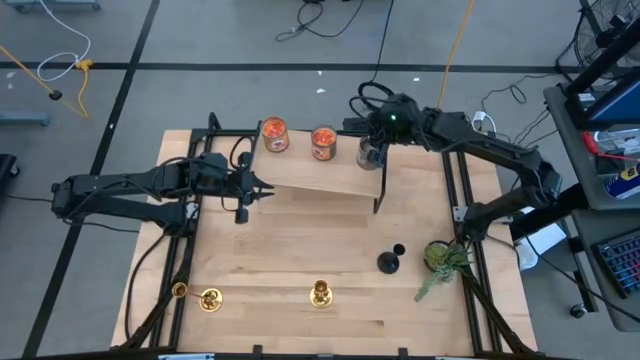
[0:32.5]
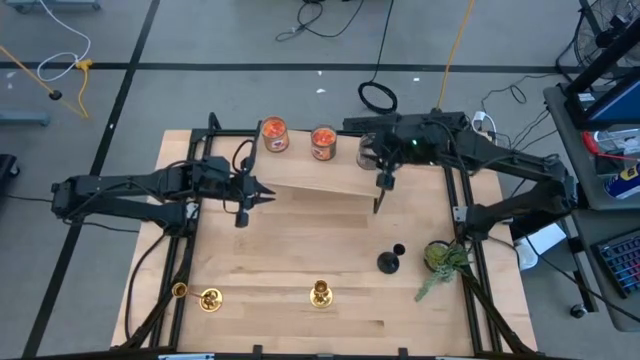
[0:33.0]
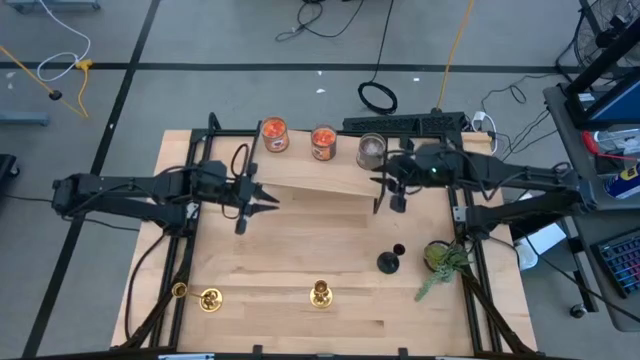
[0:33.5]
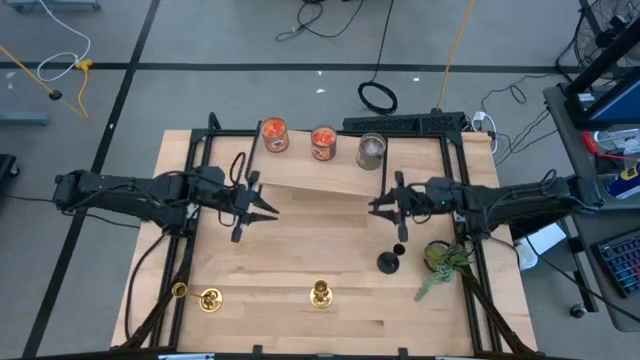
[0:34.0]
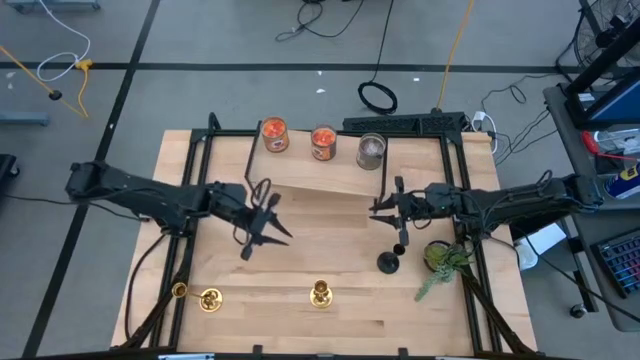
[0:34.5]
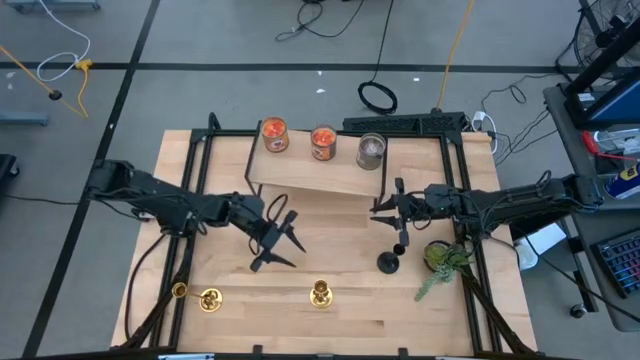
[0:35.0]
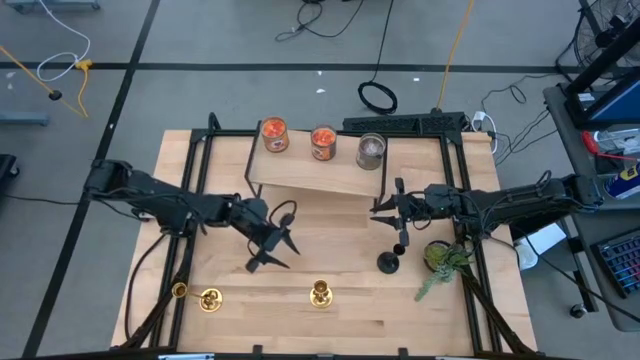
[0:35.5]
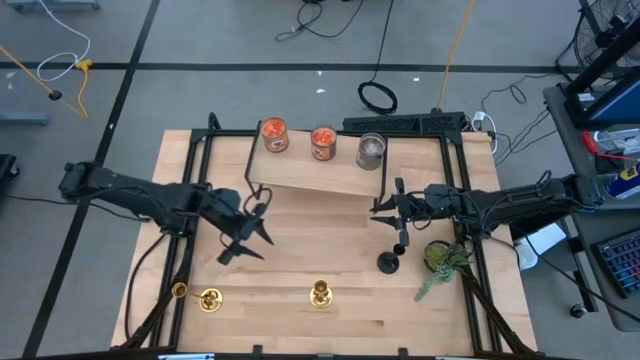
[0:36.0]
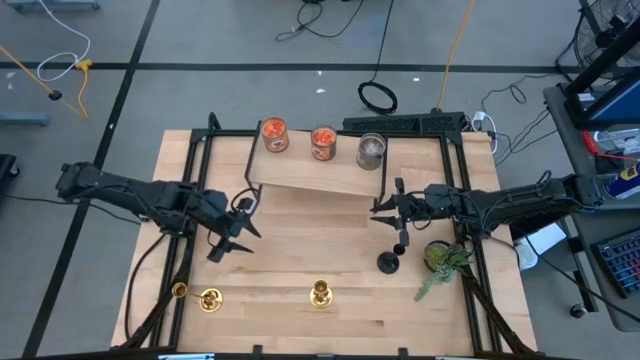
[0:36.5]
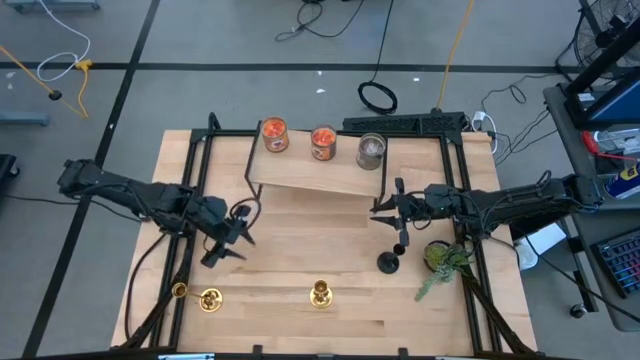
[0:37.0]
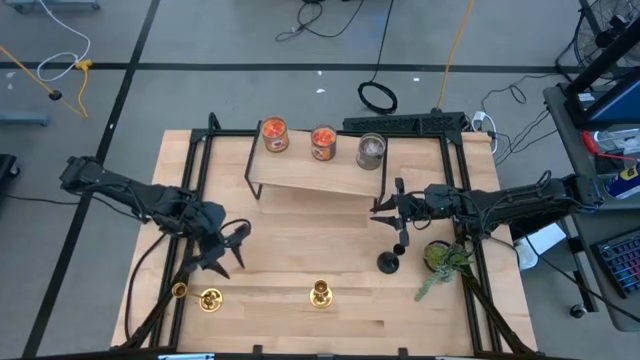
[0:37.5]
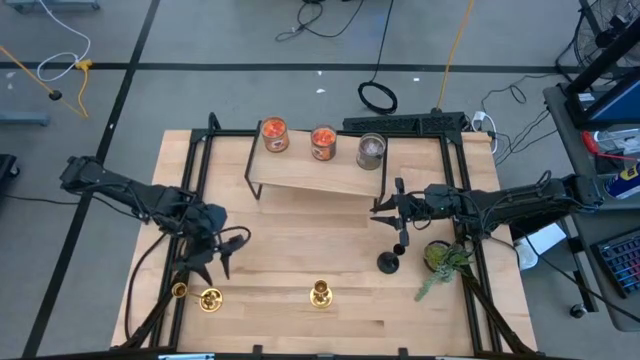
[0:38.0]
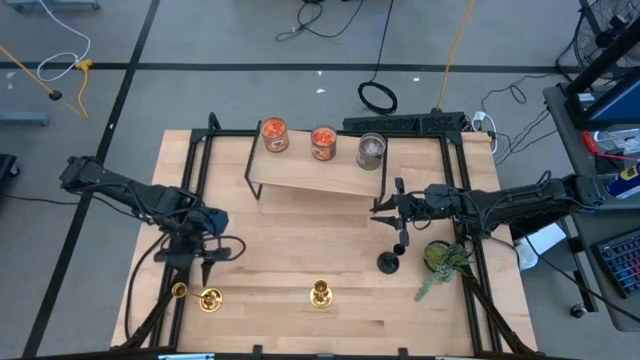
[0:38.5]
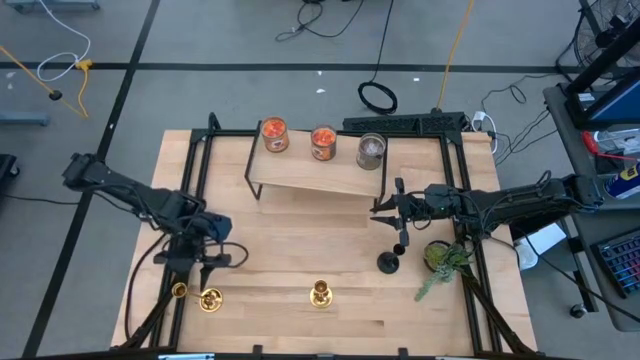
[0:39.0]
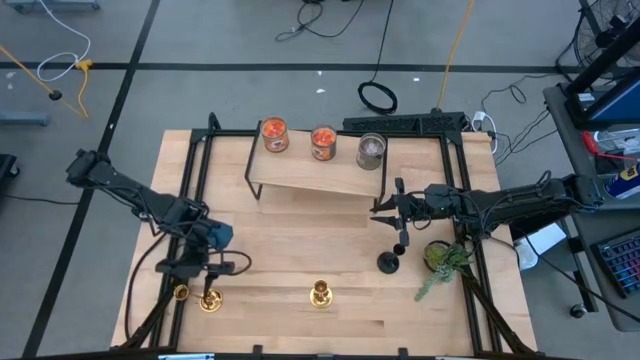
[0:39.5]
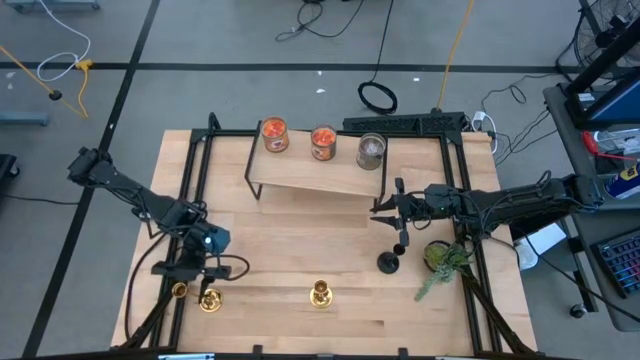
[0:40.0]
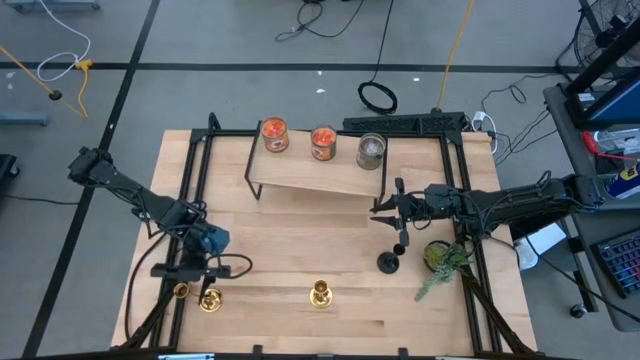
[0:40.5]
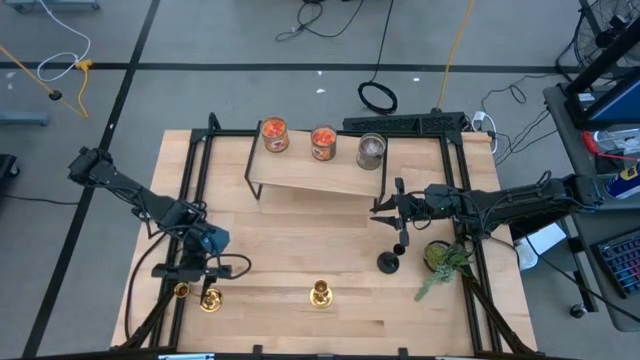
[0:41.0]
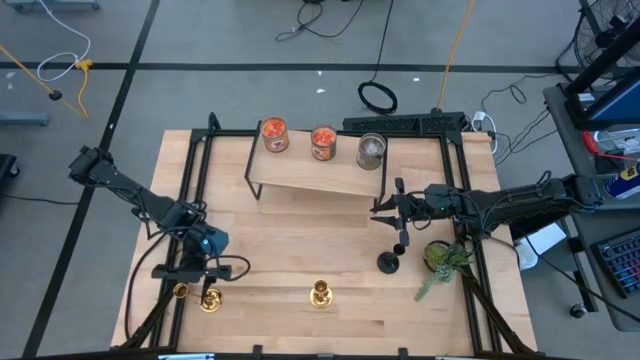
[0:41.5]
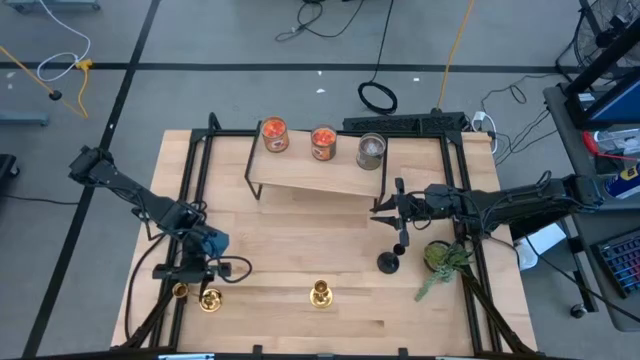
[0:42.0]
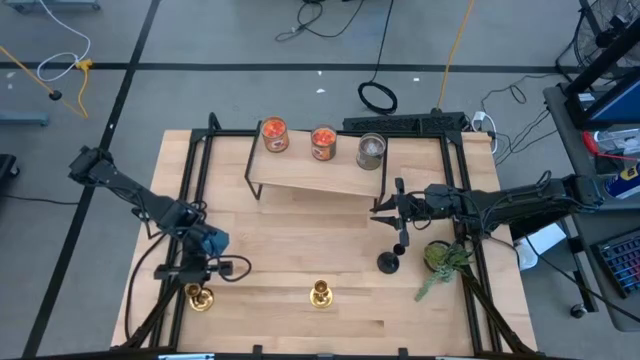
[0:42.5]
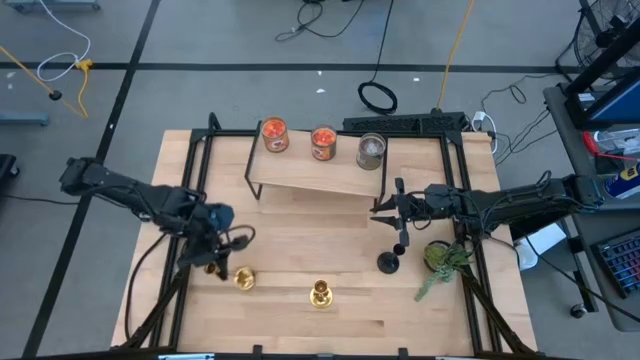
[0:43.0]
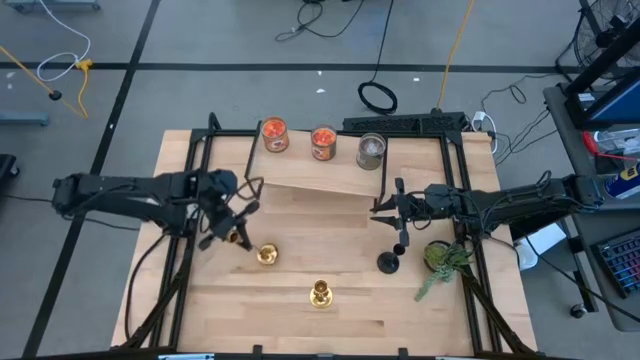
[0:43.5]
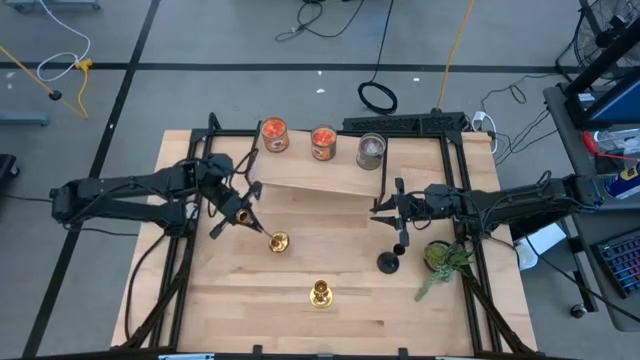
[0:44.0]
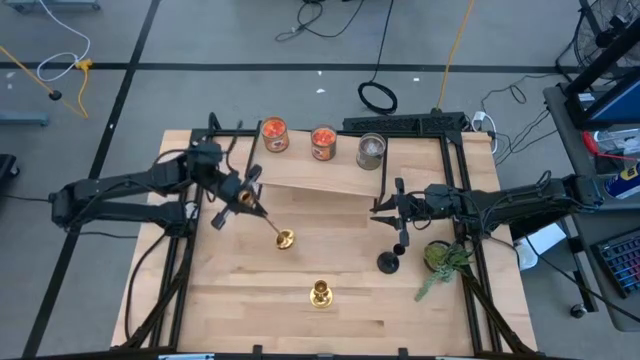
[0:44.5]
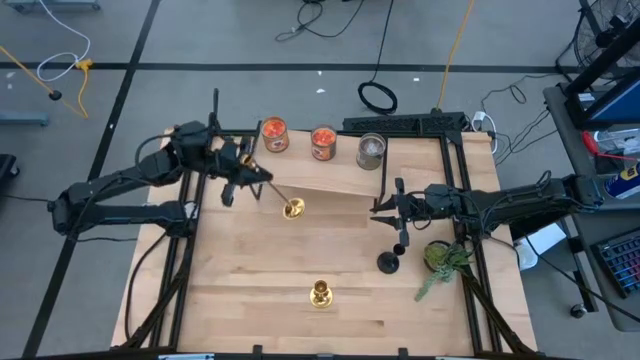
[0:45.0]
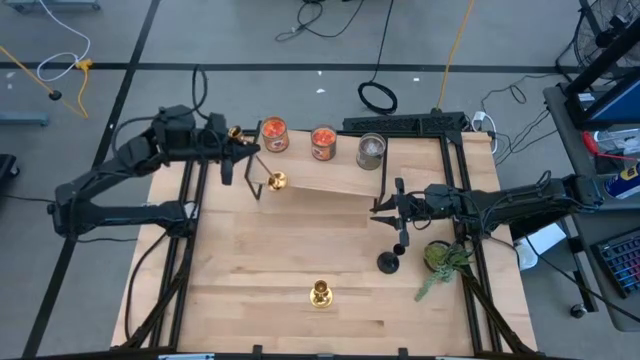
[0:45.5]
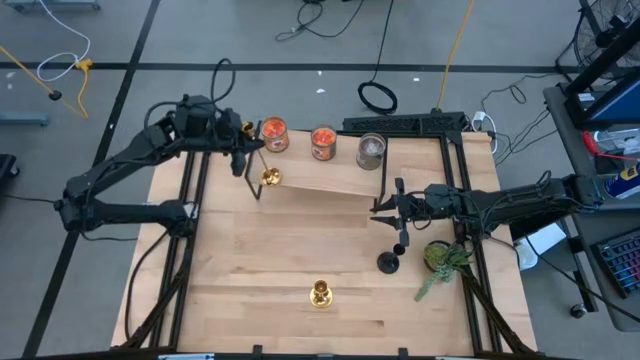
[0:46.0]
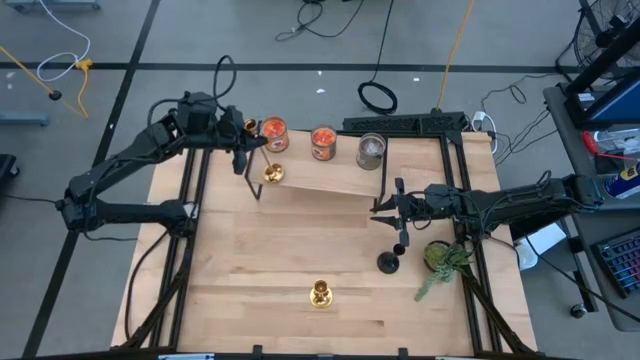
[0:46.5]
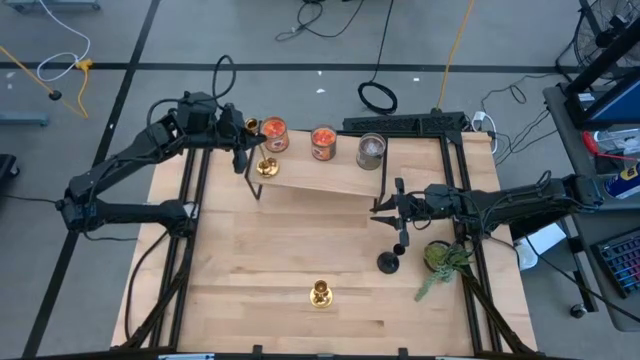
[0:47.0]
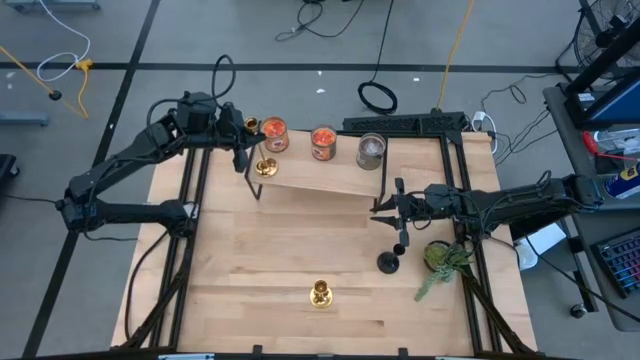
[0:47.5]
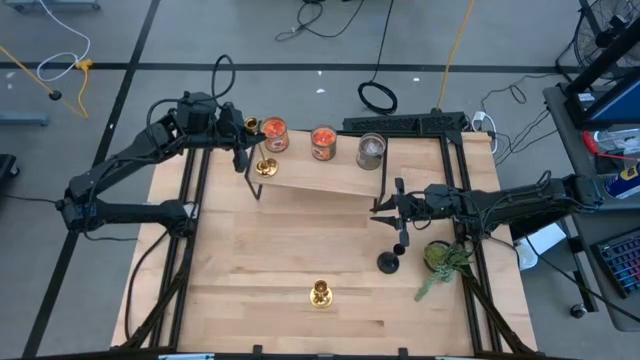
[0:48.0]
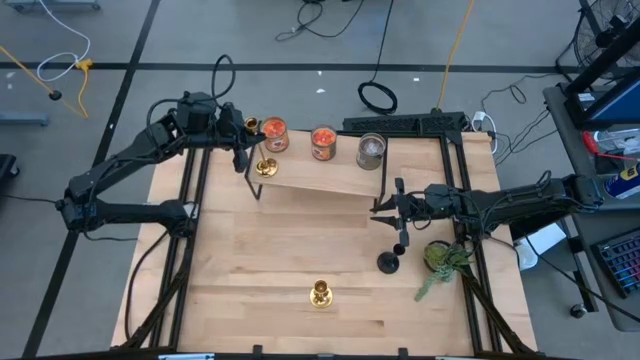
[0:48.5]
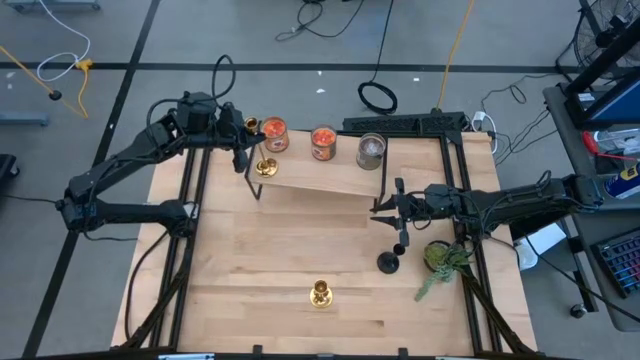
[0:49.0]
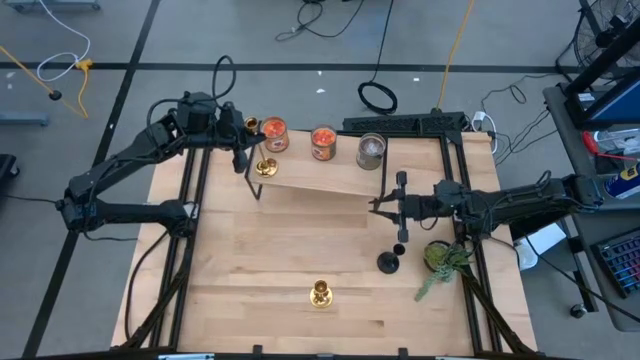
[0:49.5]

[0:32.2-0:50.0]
Task: Pick & Place candle stick holders
Put the left gold candle holder on the shelf

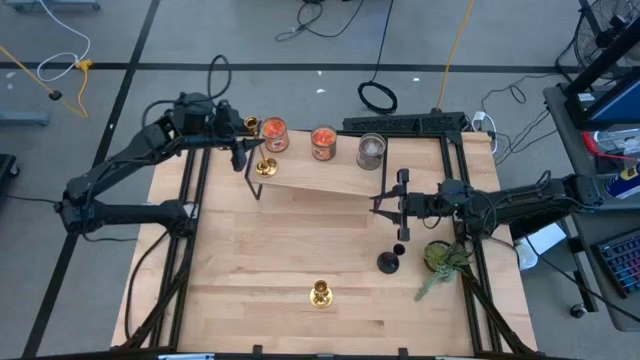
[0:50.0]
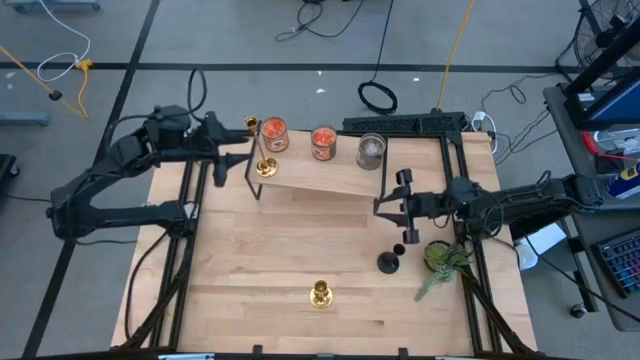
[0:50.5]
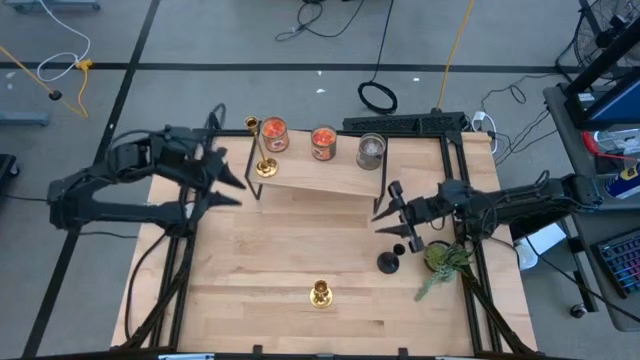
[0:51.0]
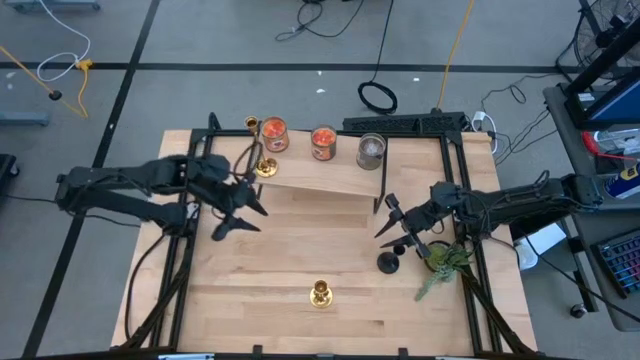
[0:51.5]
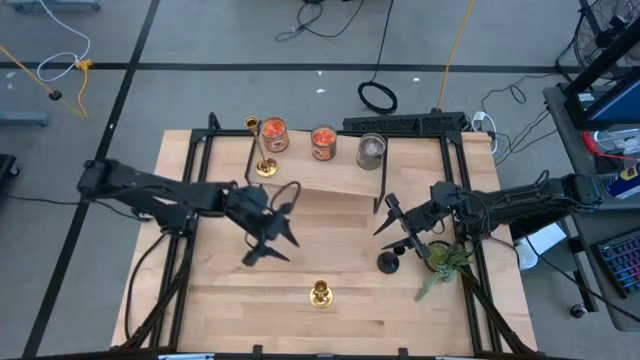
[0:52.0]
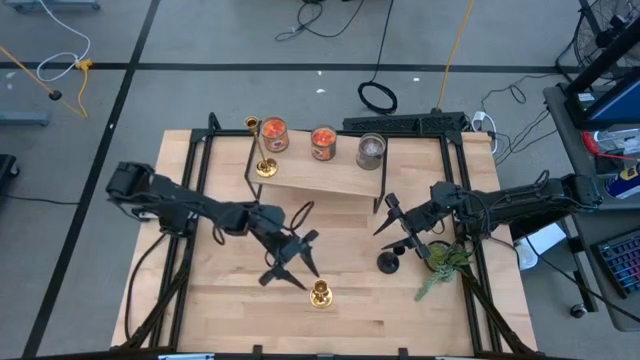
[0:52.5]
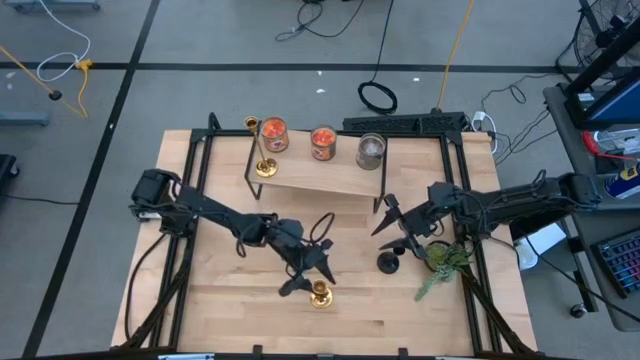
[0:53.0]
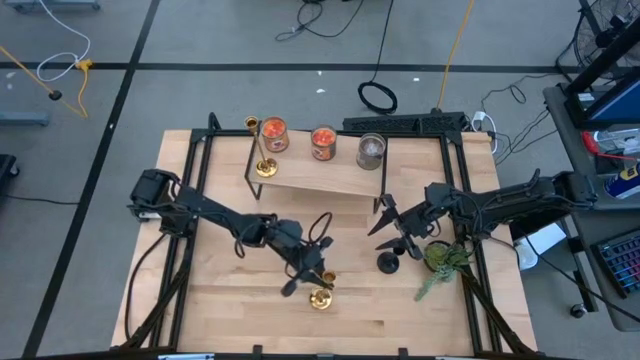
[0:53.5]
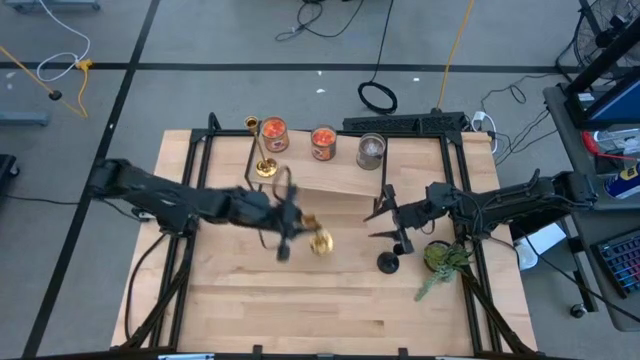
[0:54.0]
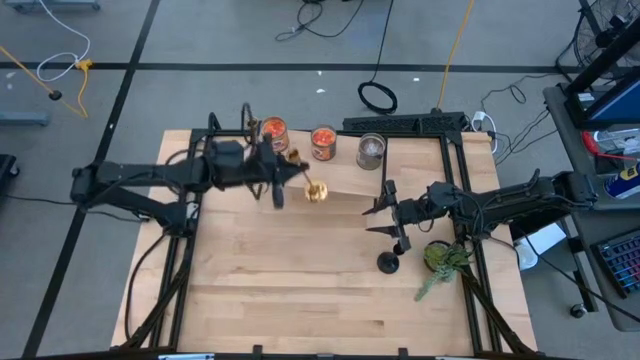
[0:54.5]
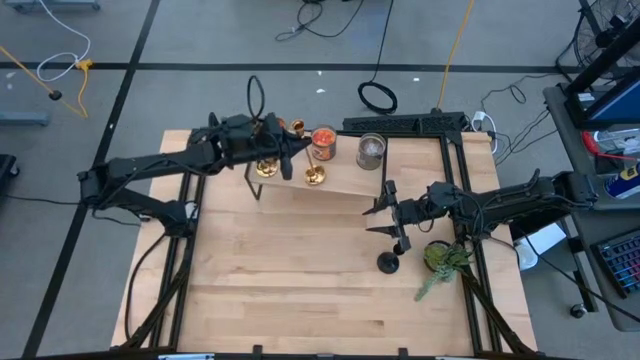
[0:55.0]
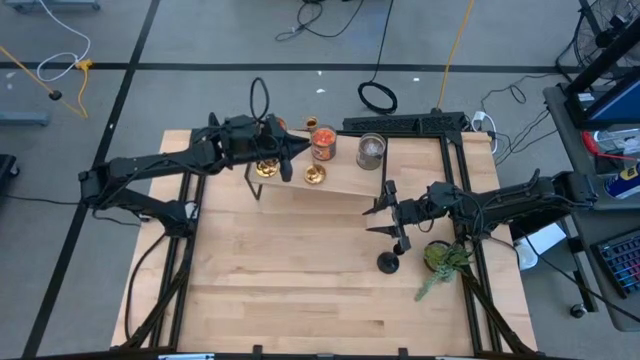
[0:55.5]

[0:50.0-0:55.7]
Put the gold candle holder on the shelf
